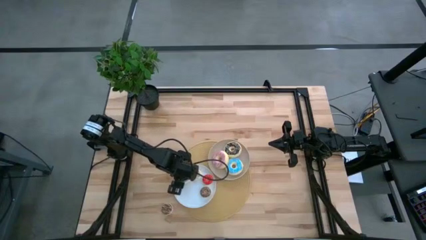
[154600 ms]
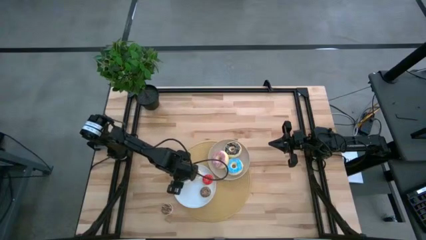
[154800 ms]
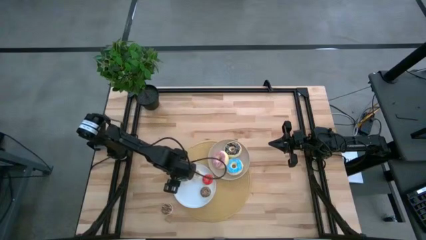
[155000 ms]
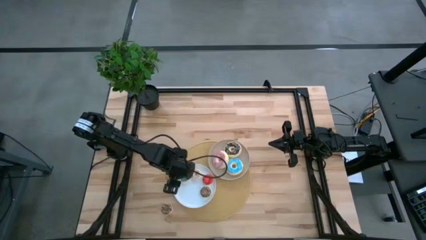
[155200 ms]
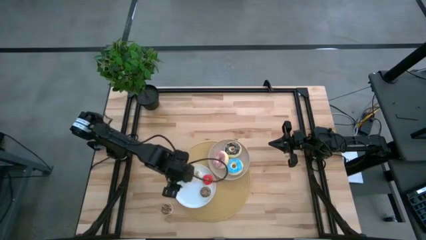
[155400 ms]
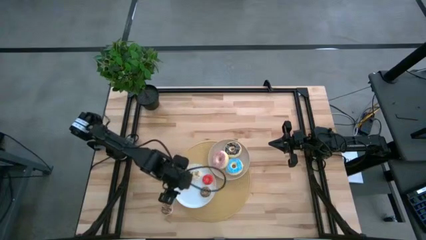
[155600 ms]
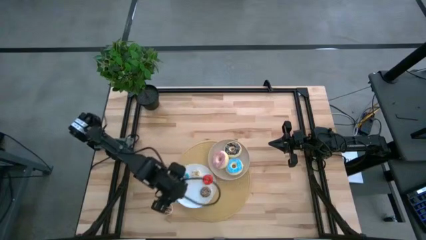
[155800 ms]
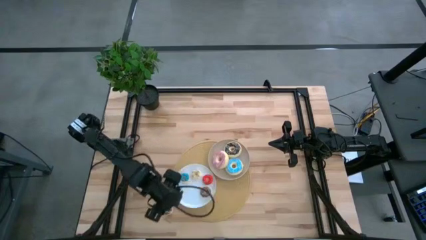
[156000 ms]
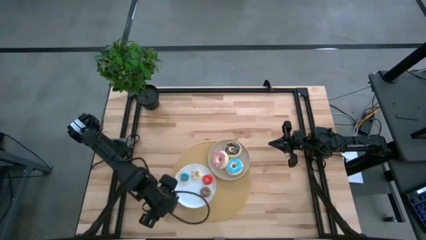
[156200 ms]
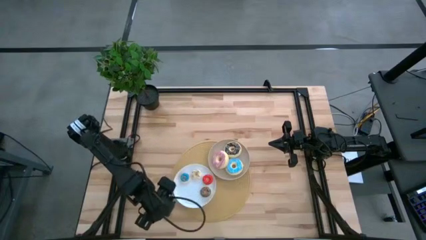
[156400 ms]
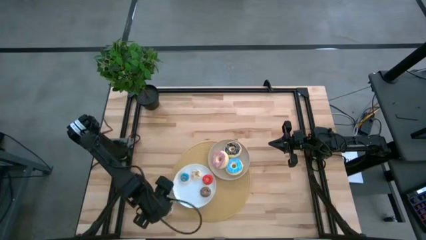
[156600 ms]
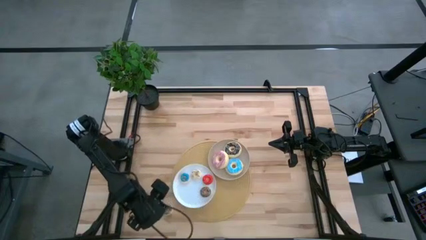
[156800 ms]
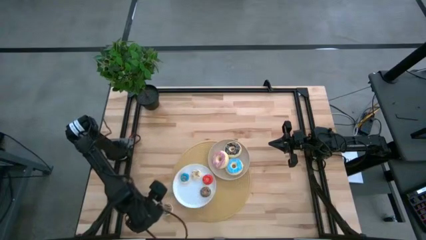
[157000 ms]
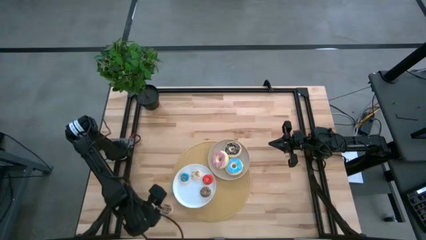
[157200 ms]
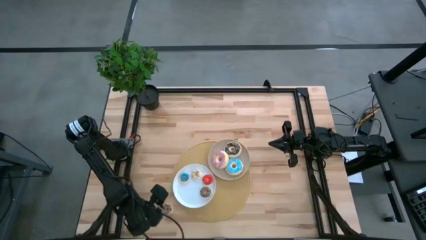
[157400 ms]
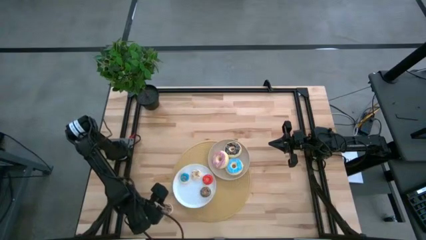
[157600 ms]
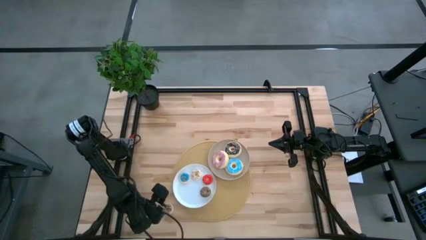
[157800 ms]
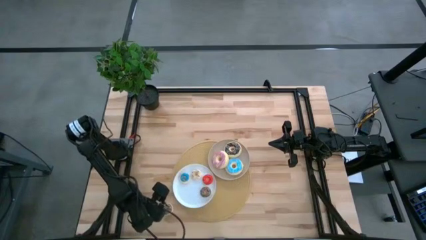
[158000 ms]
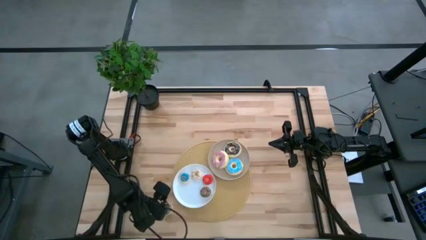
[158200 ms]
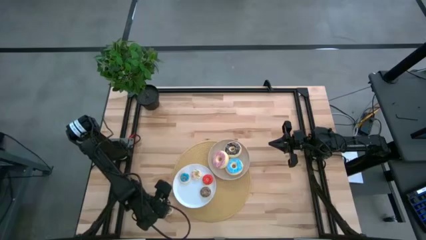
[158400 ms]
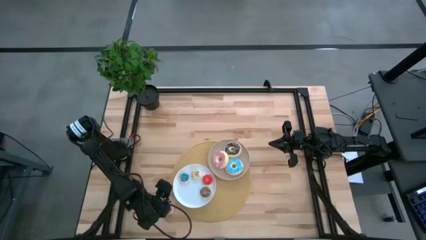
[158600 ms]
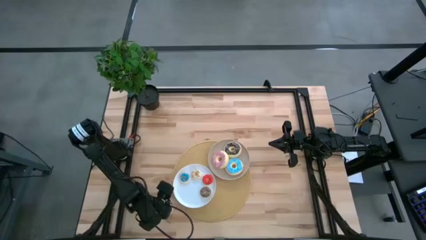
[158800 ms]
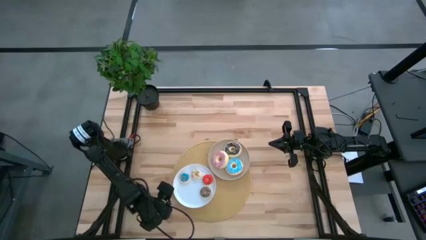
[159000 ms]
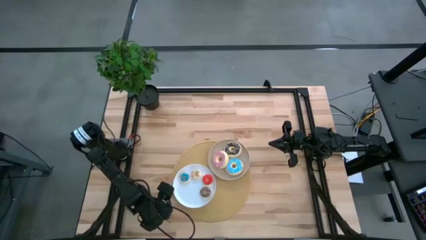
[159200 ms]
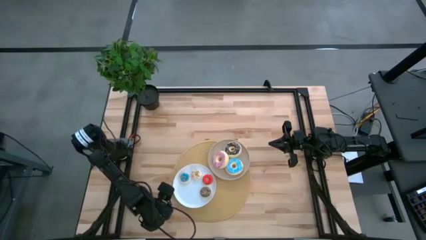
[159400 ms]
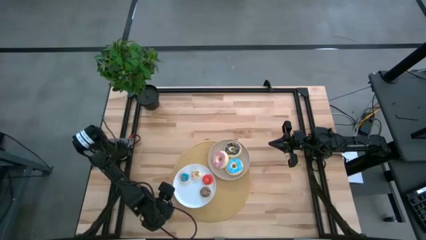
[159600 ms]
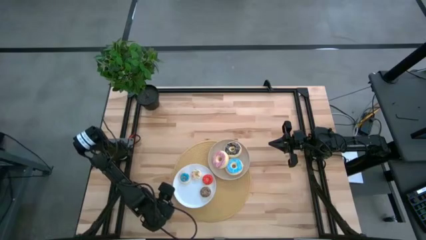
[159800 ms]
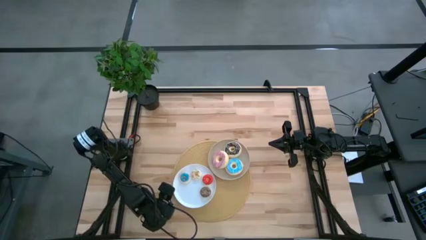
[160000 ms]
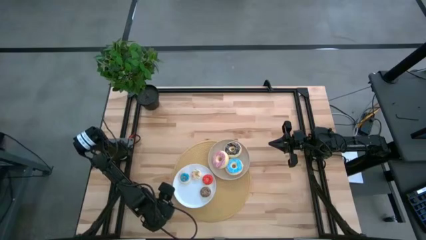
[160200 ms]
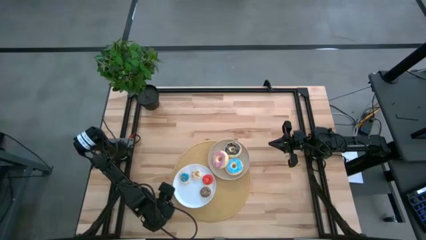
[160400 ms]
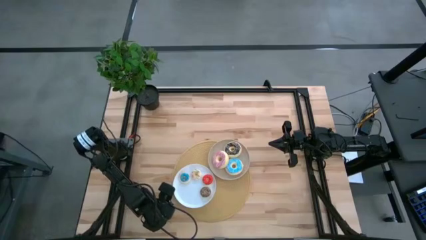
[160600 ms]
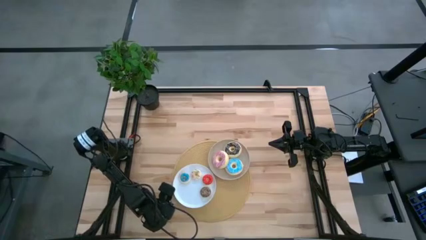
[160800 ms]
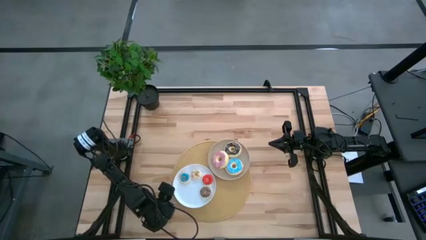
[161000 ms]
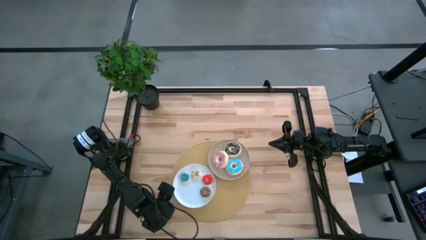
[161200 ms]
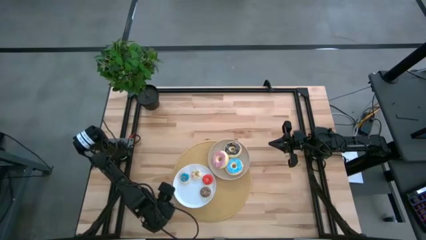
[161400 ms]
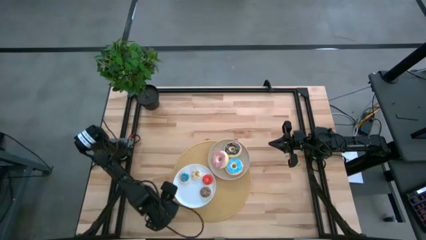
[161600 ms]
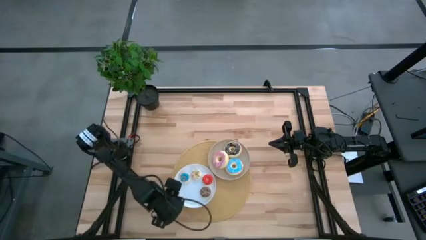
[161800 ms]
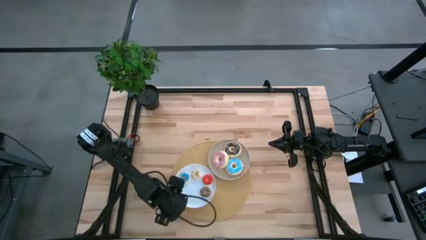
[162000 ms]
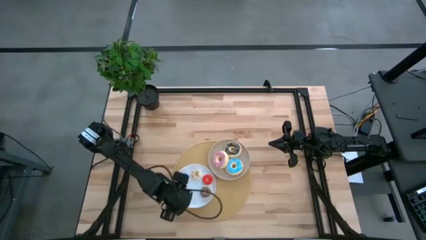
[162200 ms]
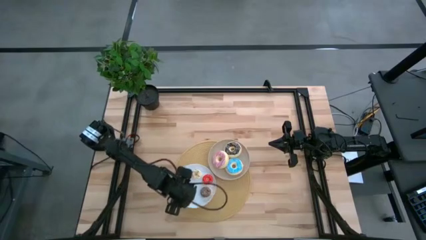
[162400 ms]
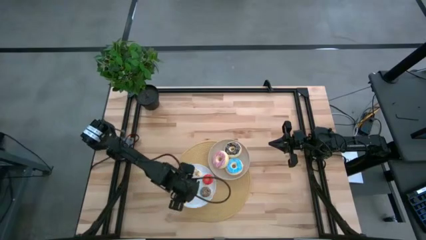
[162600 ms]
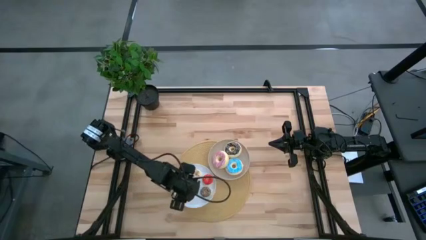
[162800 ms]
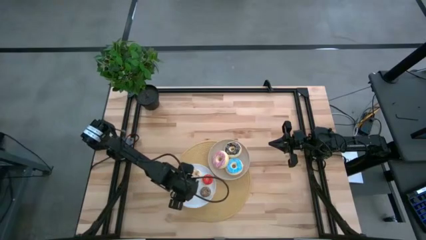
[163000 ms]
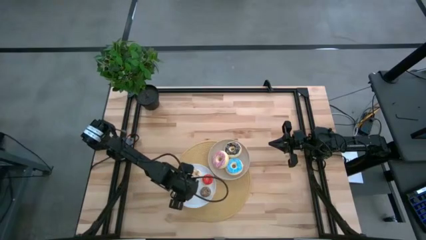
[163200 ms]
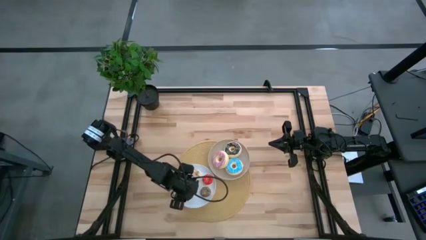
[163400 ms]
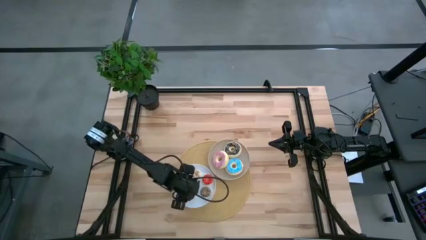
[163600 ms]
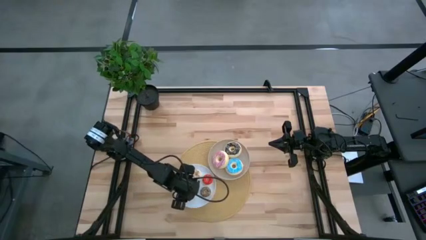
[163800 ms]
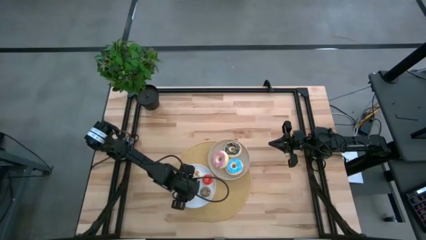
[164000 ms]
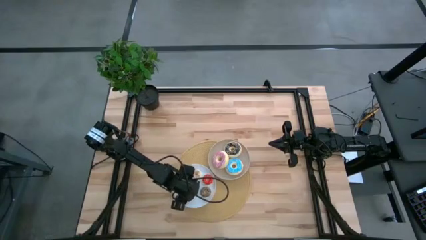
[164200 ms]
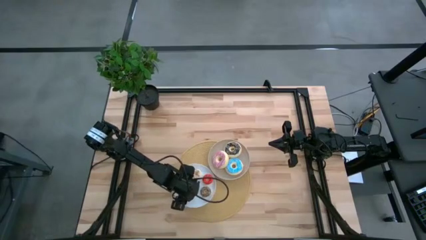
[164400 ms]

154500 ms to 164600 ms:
Task: Pick & Place donuts
Put the small brown donut on the white plate

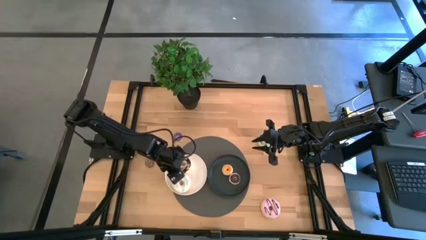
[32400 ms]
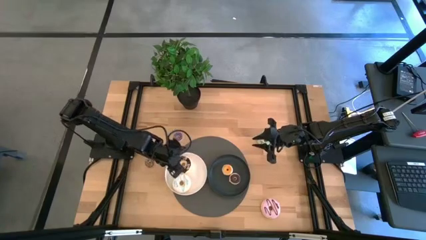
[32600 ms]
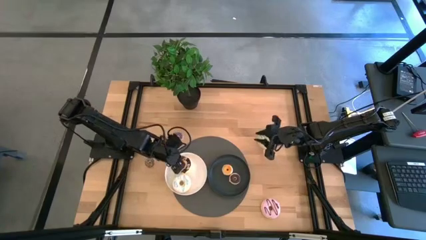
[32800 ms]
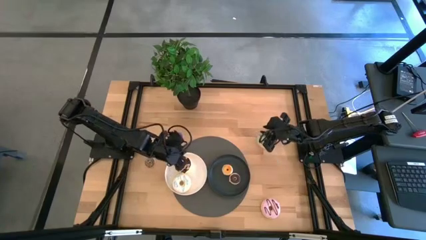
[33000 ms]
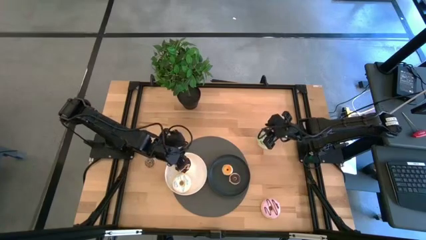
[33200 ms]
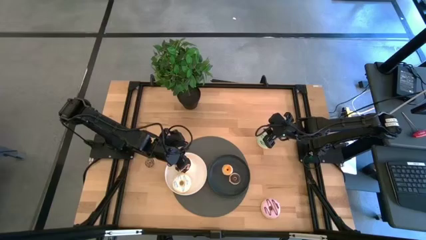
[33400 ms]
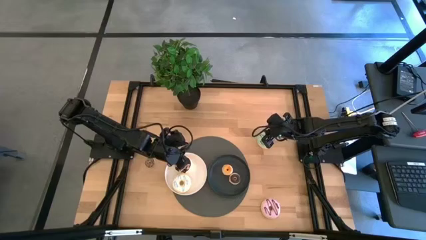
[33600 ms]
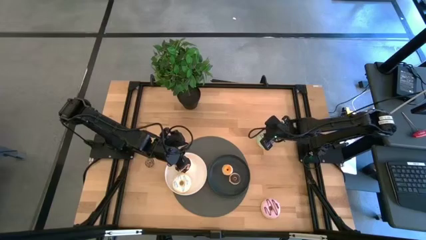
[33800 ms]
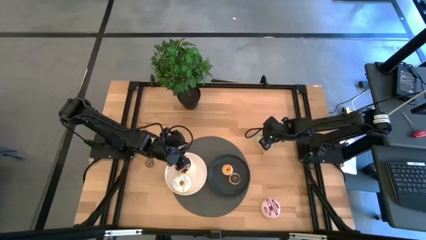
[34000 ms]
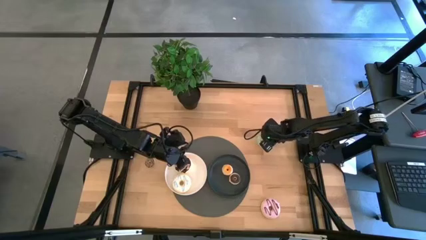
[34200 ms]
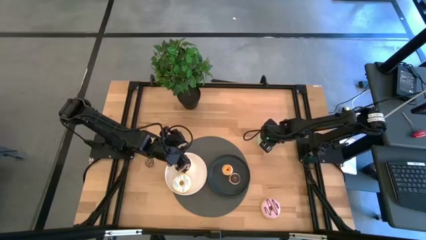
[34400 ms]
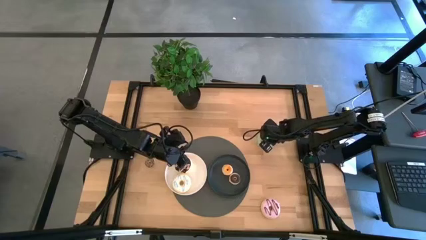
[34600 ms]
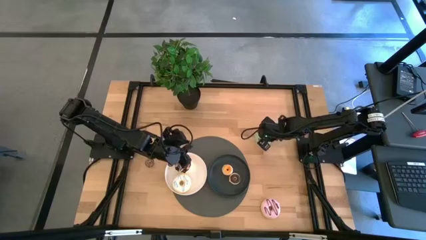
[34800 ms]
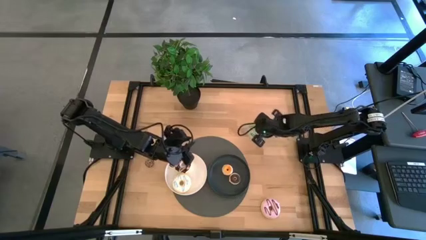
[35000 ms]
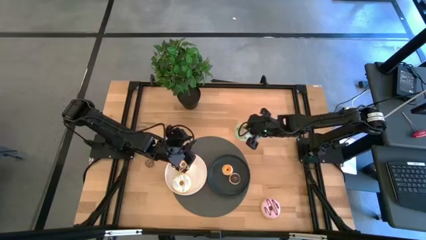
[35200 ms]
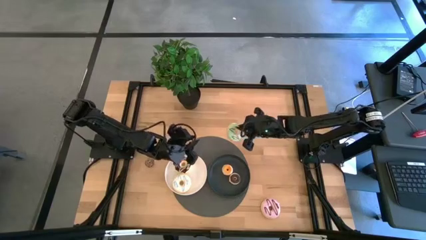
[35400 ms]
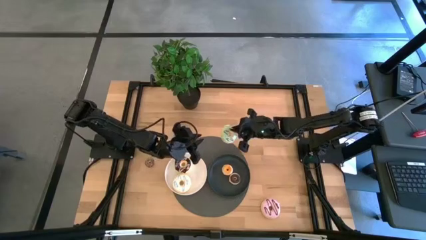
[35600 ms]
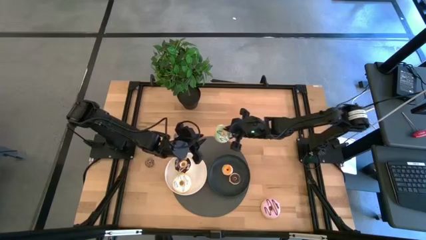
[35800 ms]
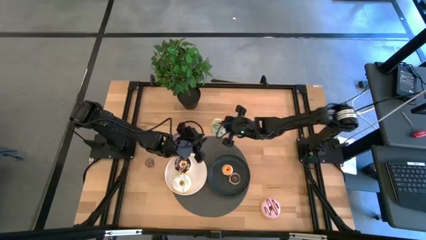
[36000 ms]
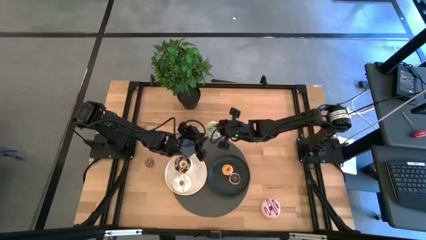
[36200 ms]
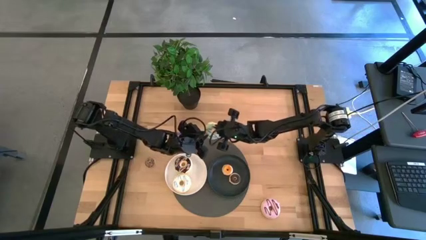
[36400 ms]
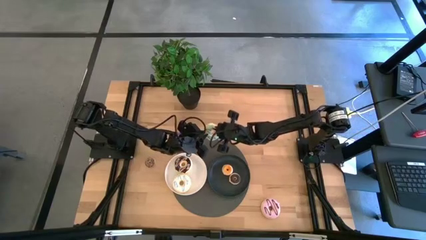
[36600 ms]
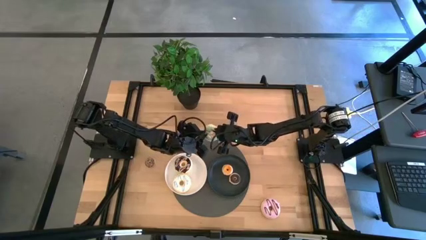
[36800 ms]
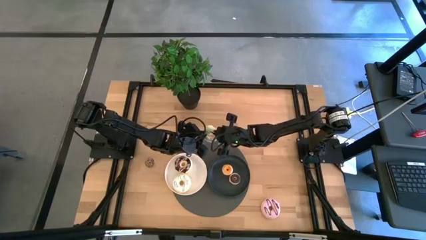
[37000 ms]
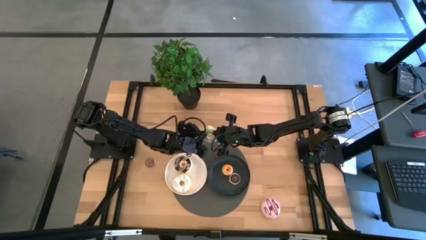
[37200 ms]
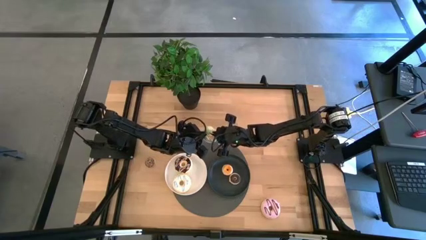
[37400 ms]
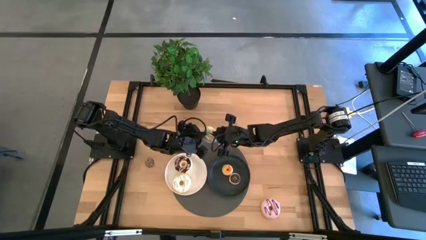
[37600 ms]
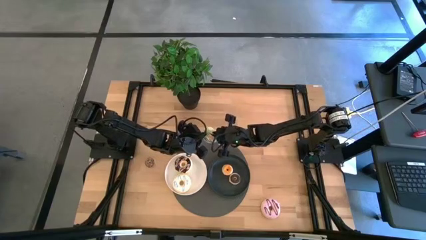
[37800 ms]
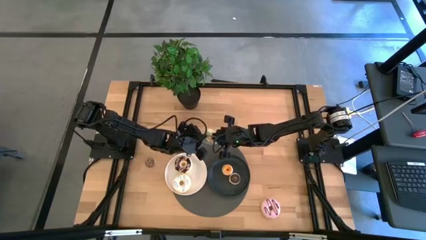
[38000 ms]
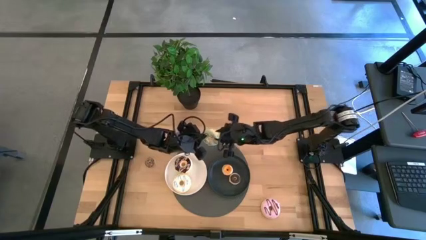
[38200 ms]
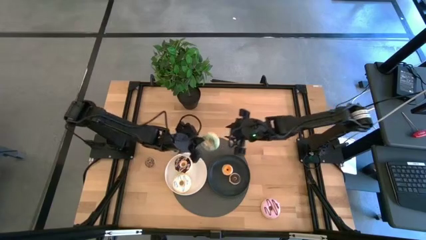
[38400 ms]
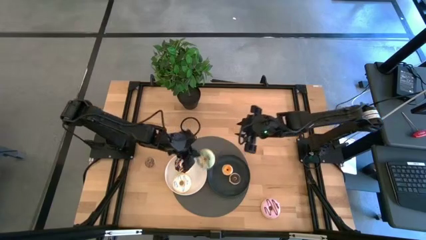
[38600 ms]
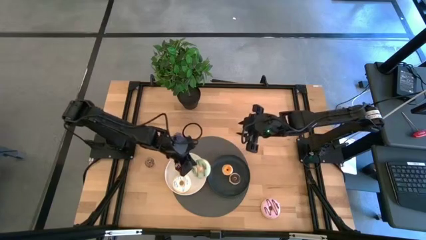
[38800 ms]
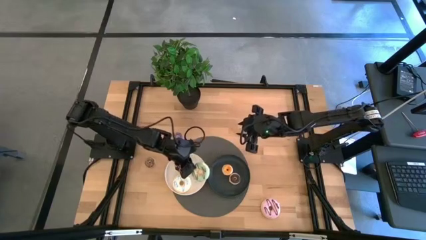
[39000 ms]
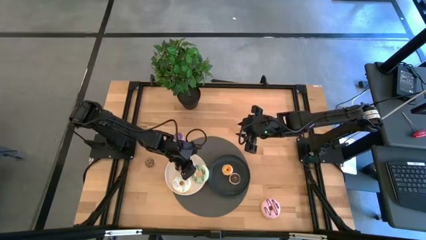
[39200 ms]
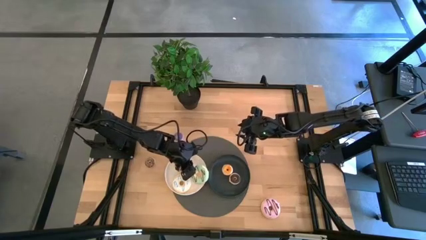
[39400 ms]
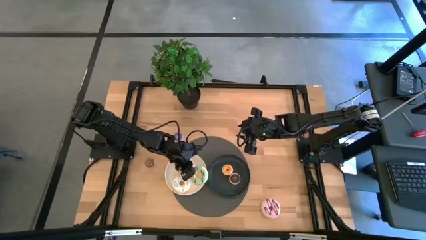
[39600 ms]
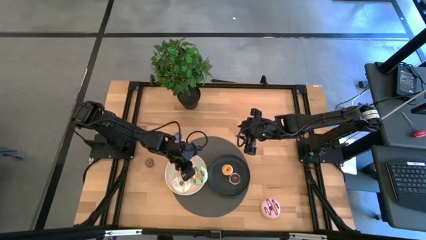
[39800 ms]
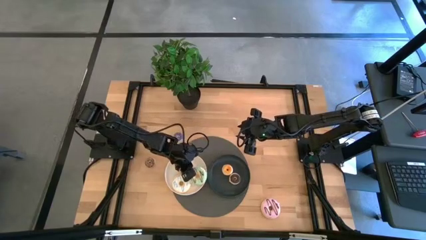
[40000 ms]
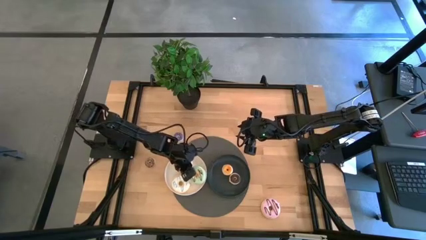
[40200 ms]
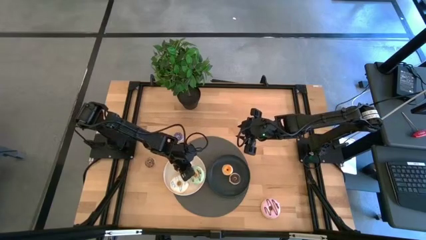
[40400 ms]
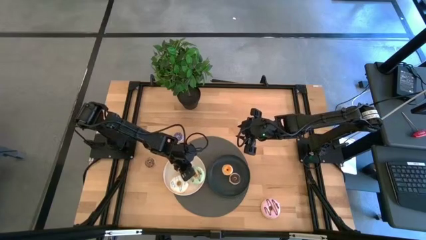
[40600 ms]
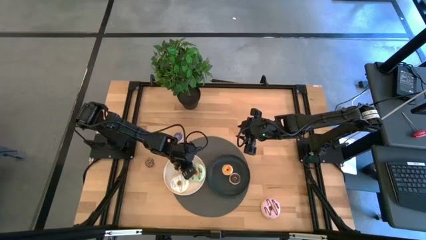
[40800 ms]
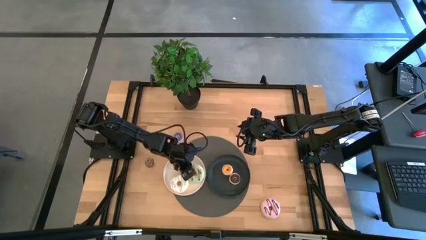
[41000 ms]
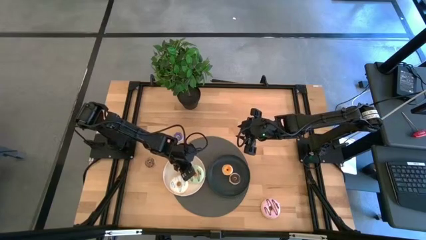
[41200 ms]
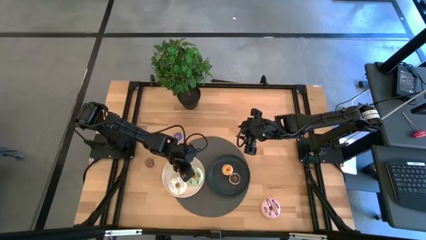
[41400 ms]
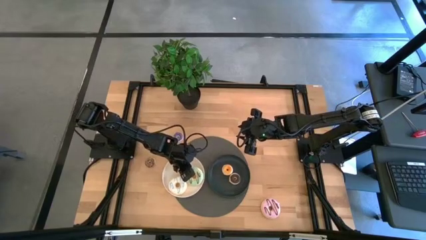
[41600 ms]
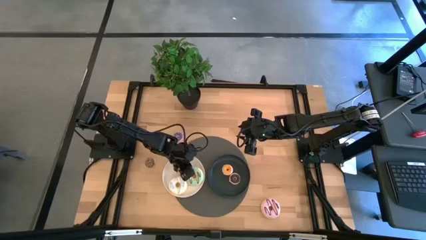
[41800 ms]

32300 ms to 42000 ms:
Task: Pick & Place donuts
Put the large green donut on the white plate
